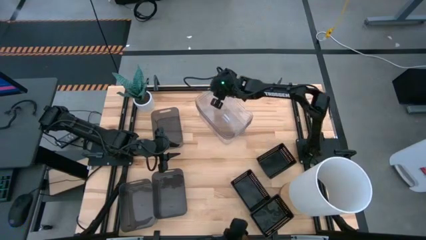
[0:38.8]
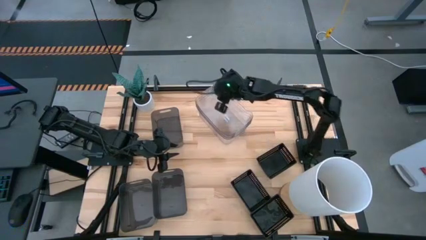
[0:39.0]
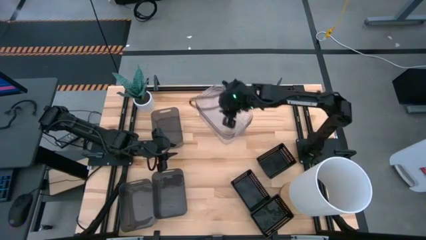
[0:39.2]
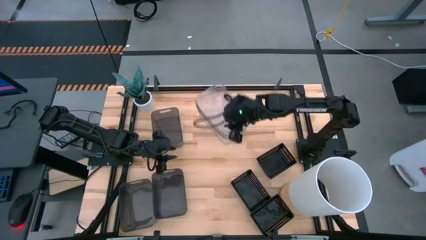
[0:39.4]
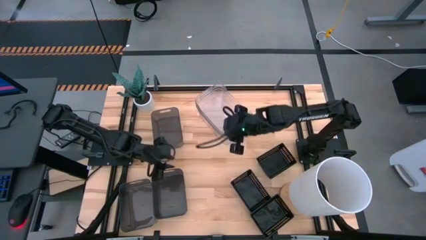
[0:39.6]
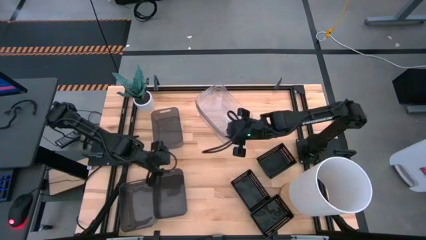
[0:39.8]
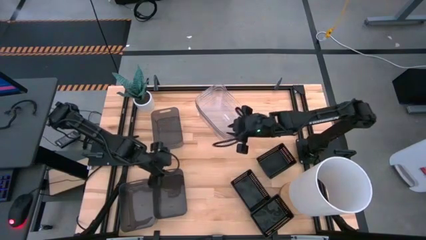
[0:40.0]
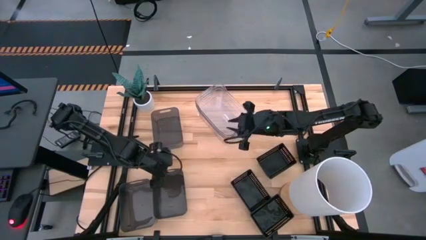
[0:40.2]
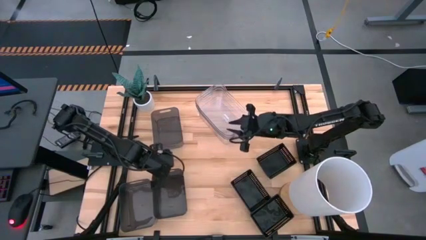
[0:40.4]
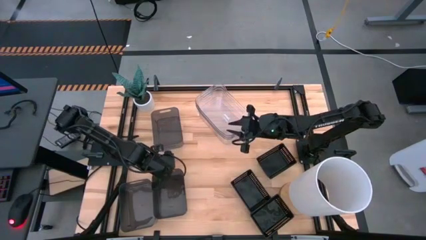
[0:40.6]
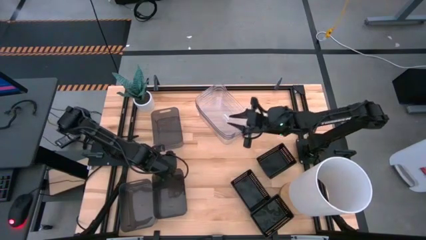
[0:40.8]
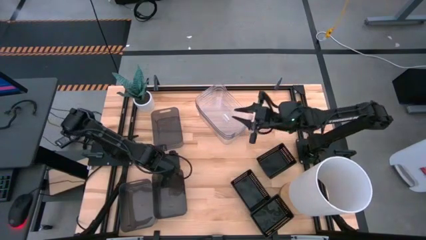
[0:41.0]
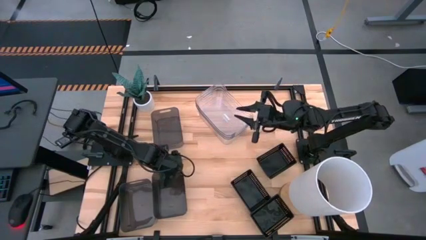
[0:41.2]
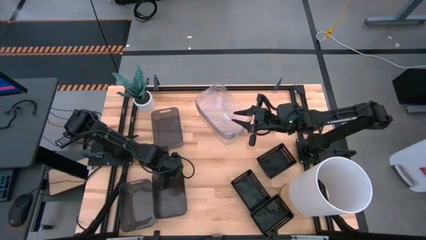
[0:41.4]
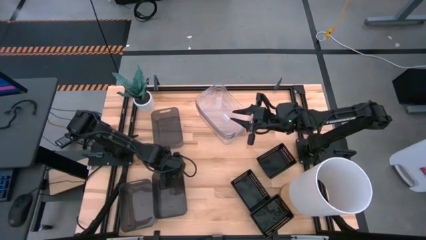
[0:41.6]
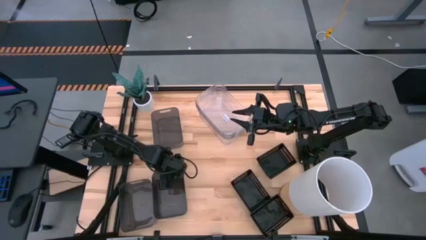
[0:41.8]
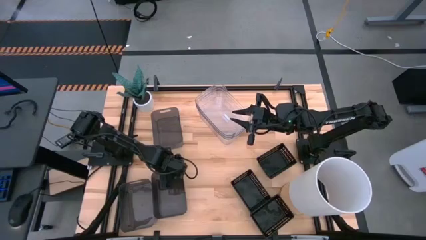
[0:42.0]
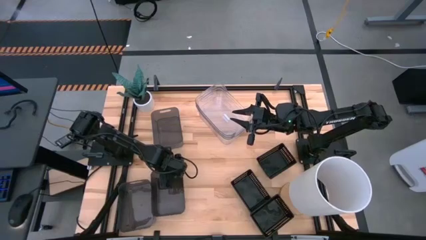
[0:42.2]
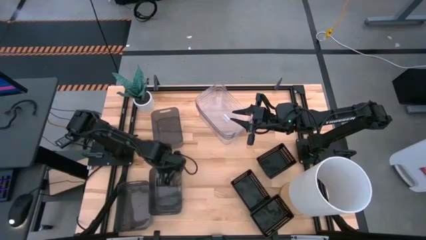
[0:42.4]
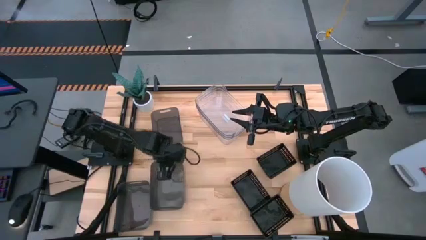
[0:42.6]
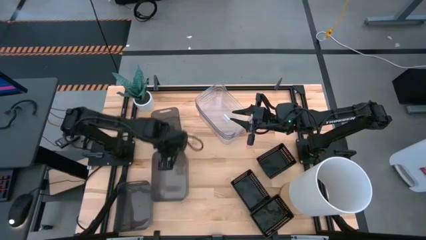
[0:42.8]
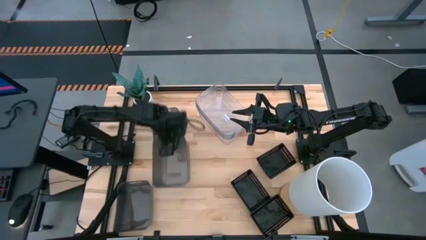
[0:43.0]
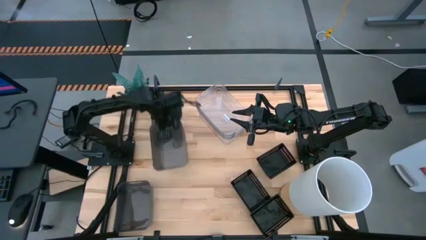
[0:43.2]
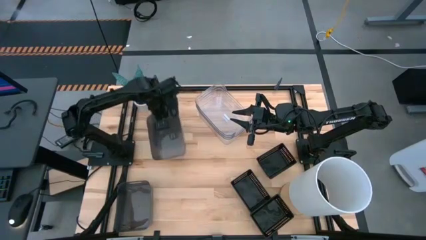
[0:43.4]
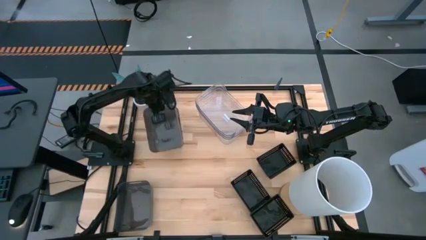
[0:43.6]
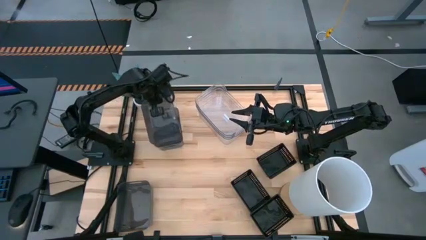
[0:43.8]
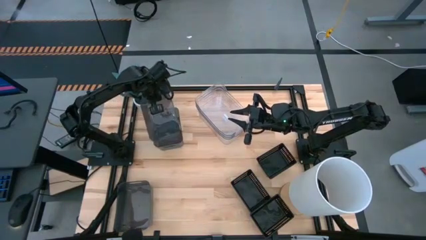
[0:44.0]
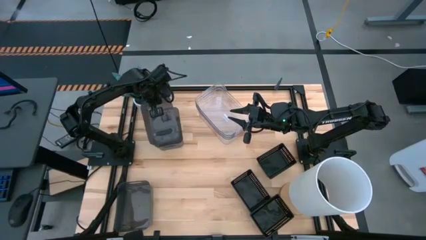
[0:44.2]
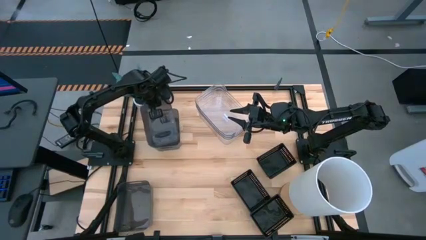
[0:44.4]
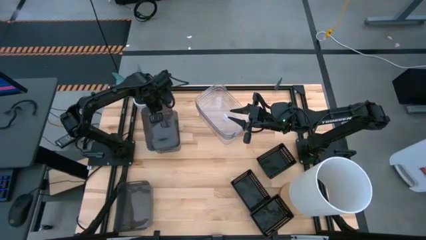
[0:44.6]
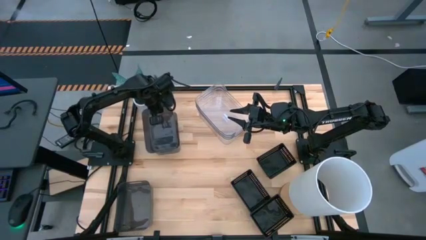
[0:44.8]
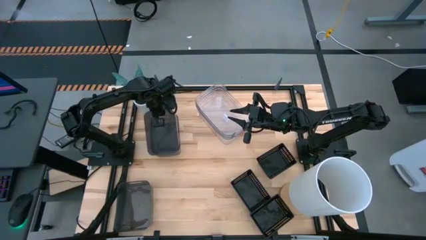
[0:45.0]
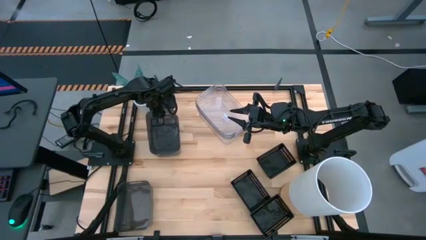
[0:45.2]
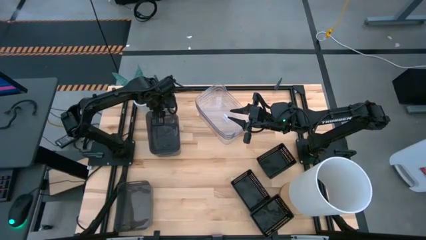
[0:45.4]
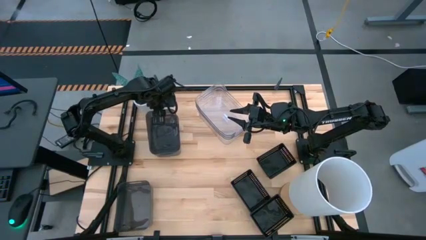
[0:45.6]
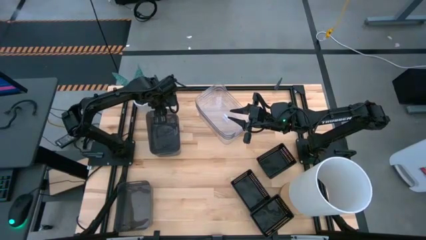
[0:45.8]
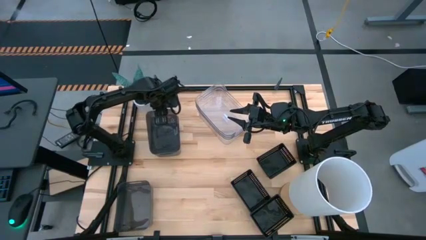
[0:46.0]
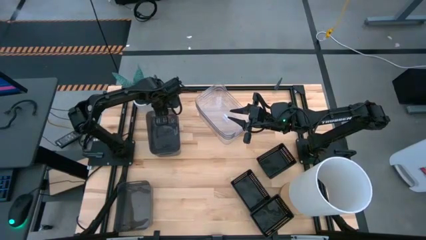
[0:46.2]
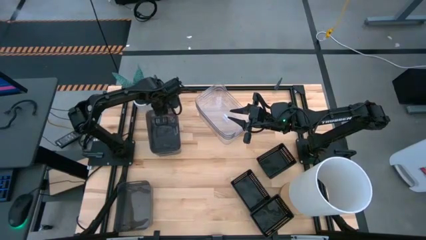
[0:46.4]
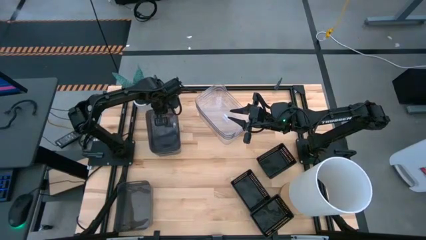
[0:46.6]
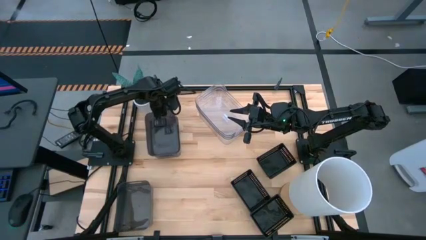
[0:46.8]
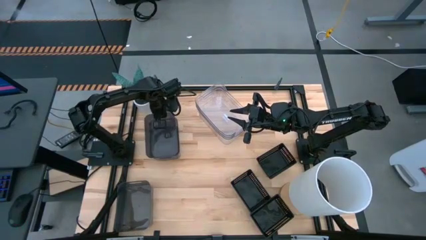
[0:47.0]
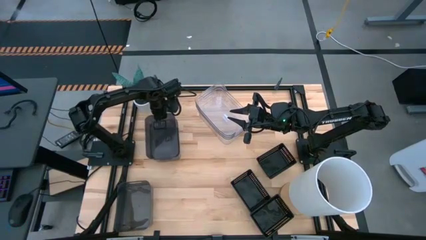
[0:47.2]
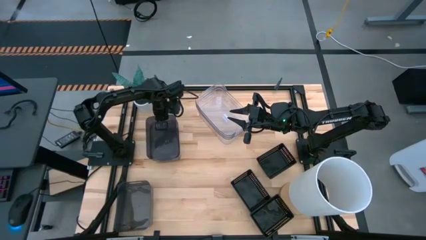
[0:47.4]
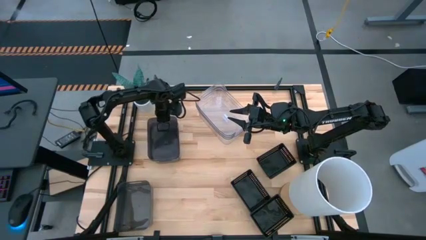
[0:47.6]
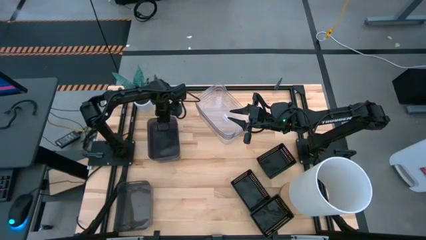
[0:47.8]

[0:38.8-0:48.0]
Stack the bottom right black bin on the top black bin

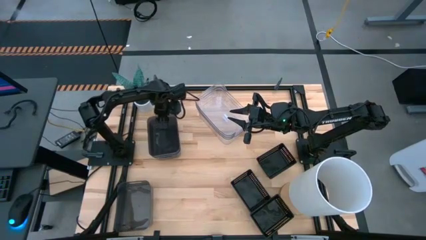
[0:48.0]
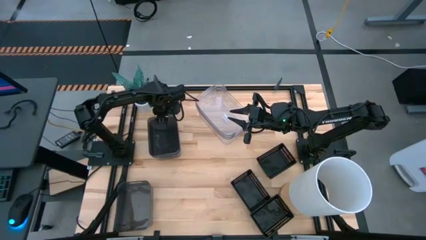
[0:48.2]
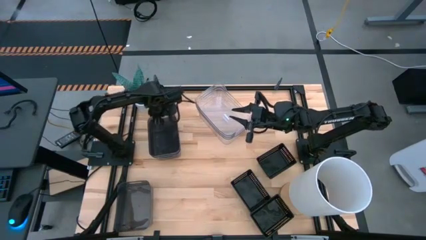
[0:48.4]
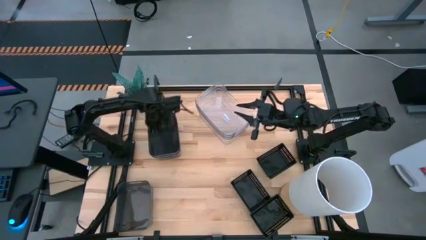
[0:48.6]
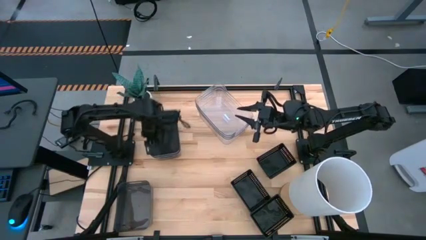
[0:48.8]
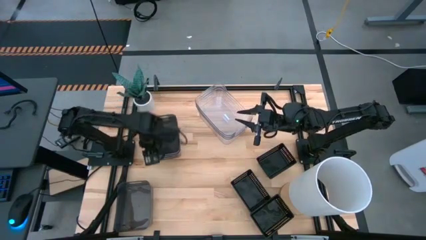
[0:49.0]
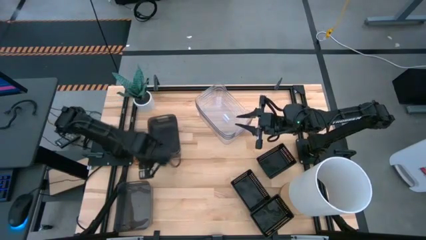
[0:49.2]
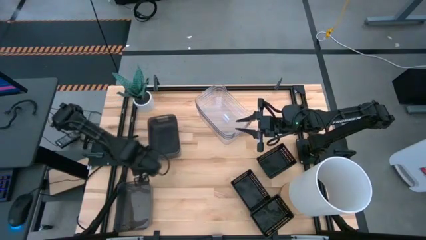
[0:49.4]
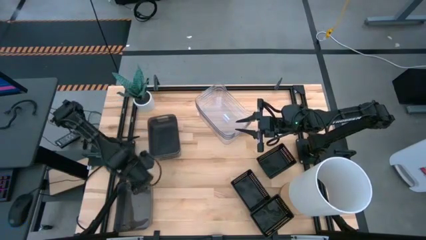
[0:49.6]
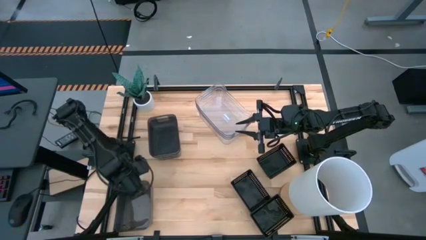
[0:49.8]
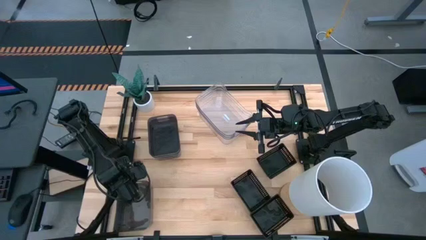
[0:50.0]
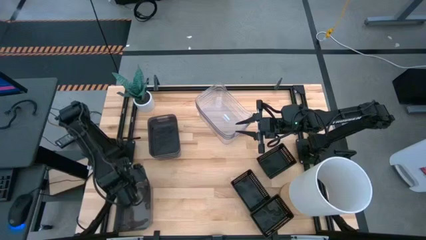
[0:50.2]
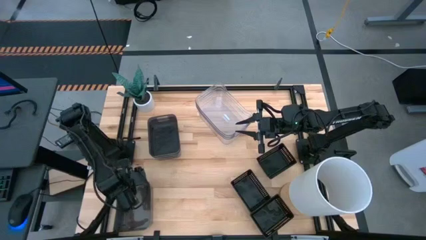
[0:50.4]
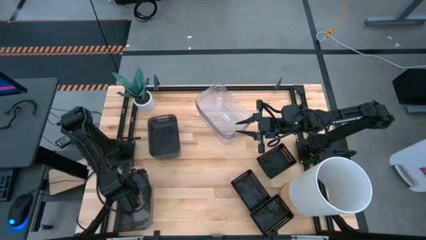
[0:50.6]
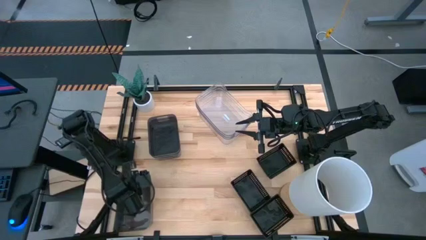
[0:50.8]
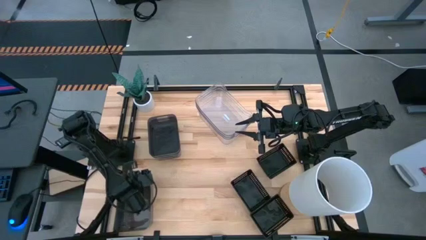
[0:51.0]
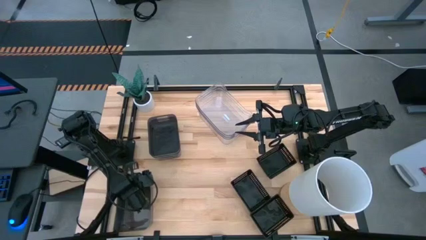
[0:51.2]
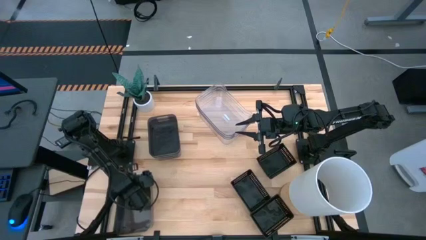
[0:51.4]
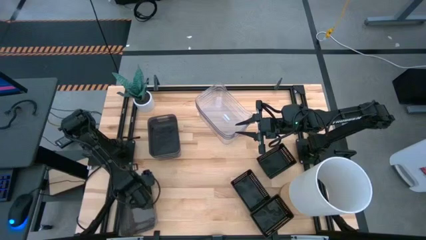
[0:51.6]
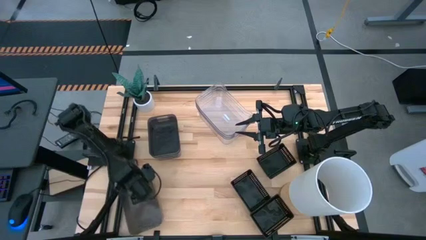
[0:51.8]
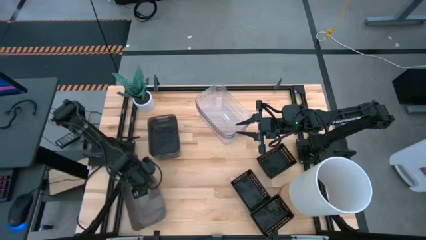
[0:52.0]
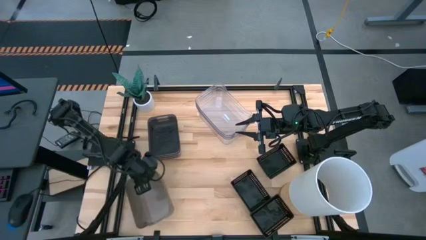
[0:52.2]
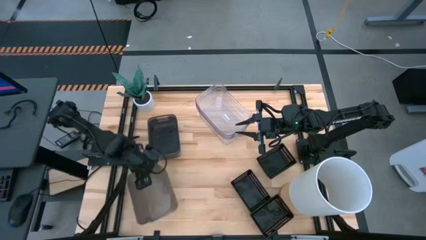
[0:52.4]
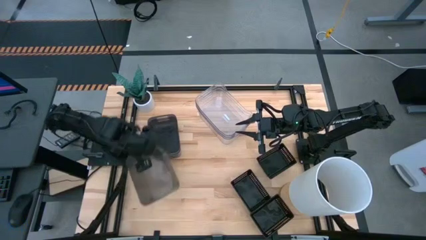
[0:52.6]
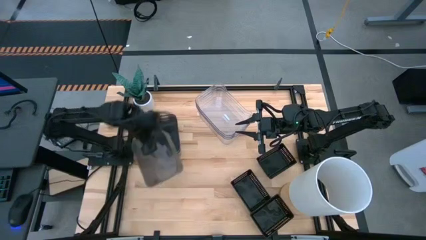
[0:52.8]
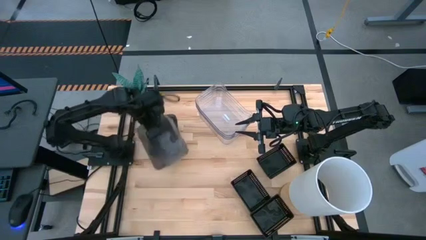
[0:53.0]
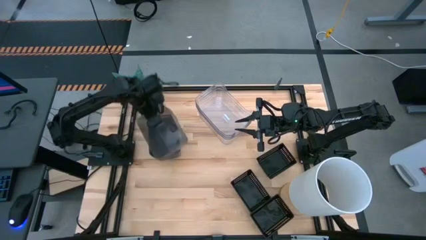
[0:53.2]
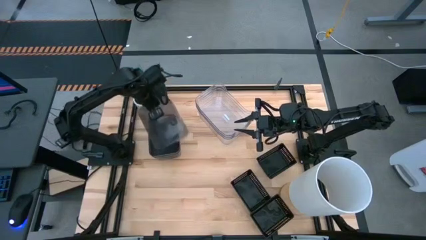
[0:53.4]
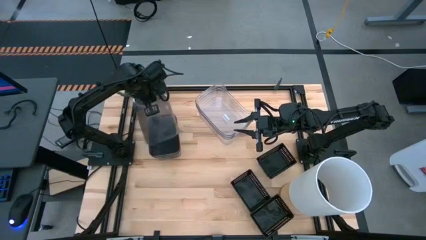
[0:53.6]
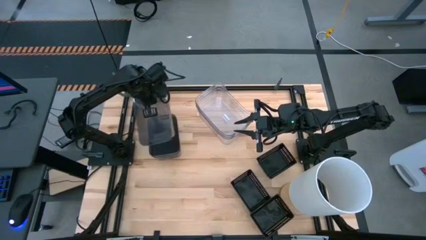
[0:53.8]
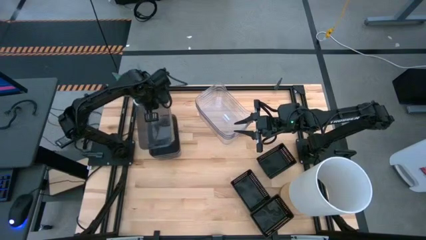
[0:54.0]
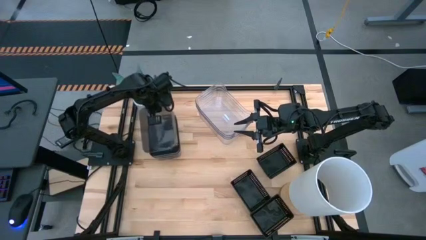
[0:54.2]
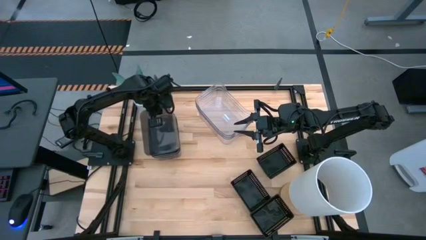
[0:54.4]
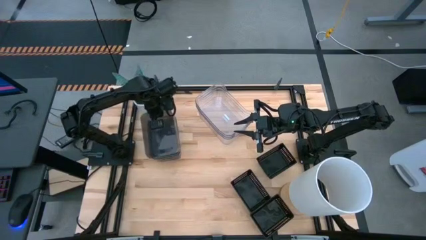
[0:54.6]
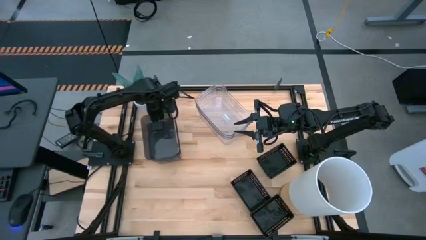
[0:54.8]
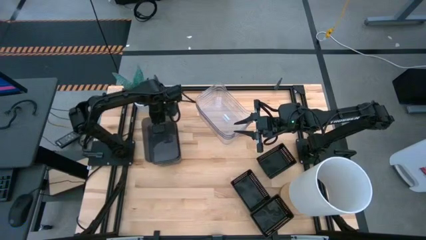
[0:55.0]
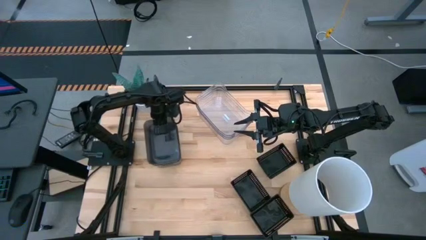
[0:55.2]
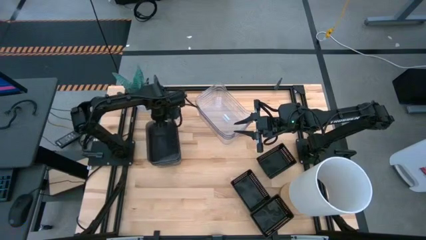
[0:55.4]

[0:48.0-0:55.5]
Stack the bottom black bin on the top black bin
